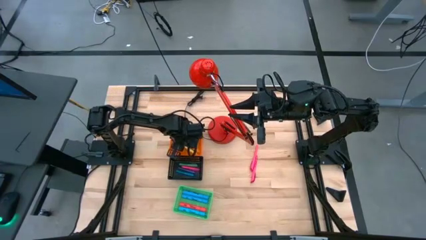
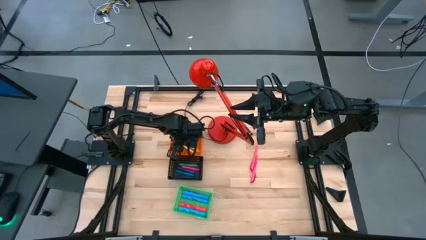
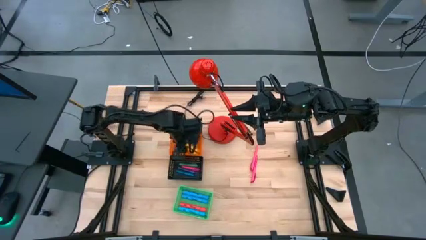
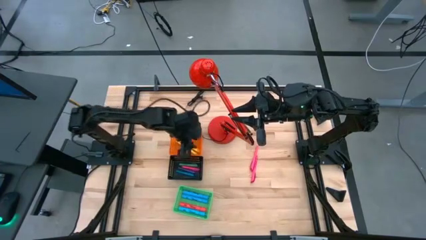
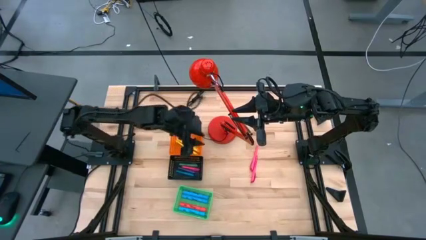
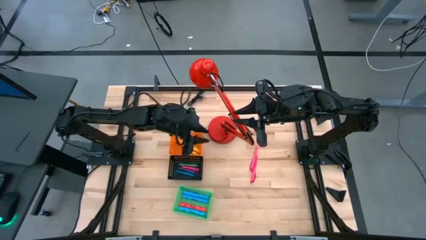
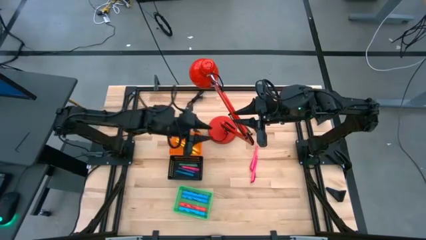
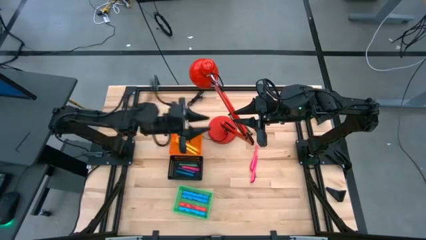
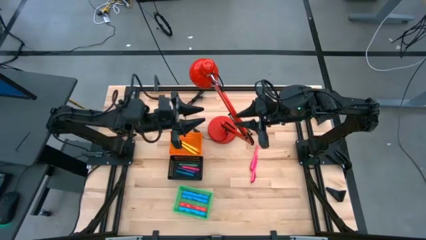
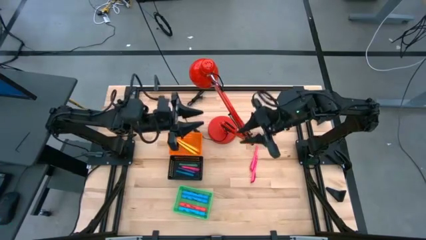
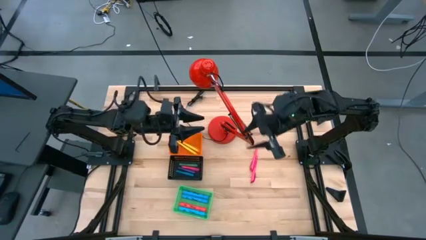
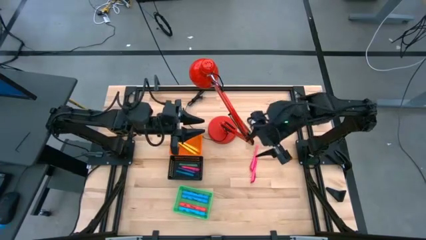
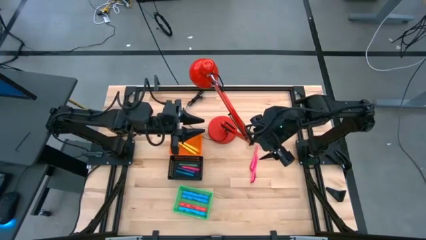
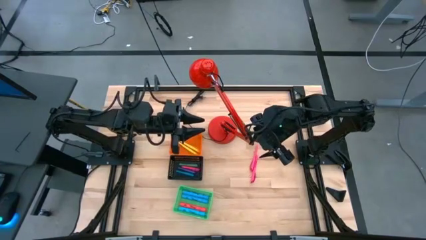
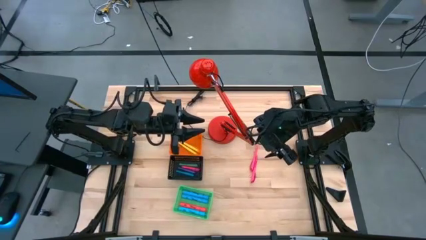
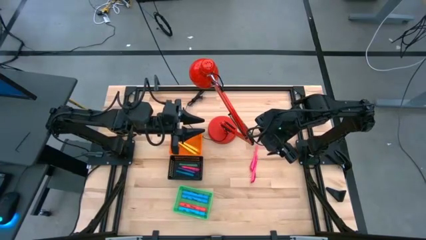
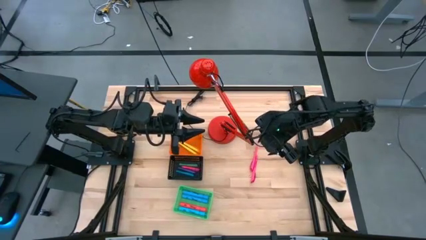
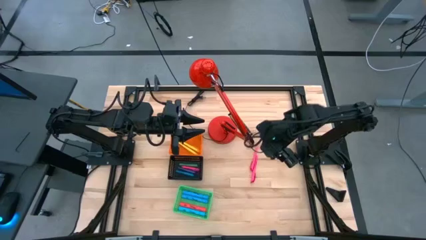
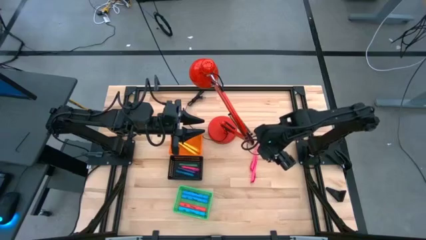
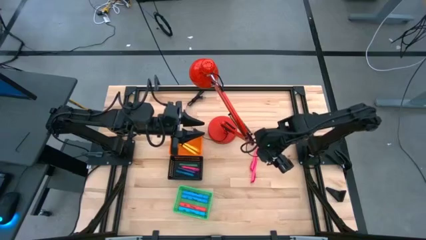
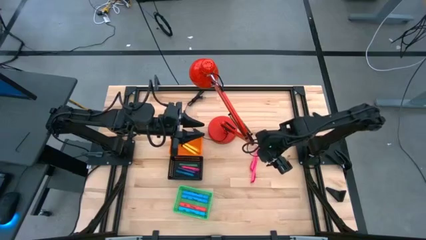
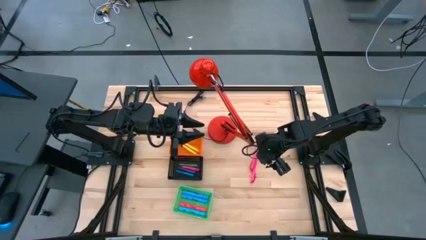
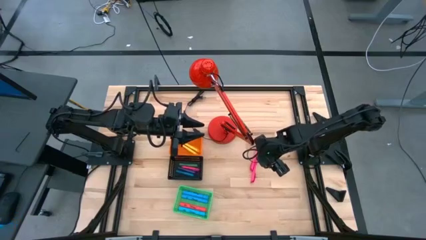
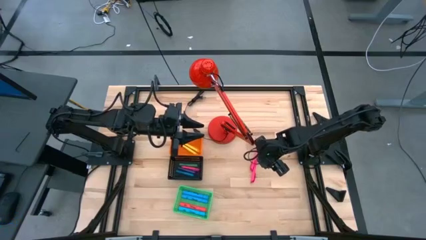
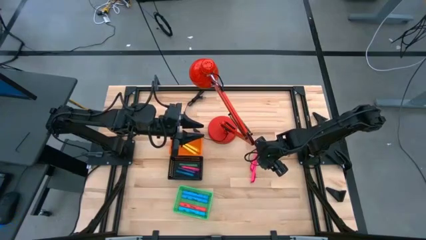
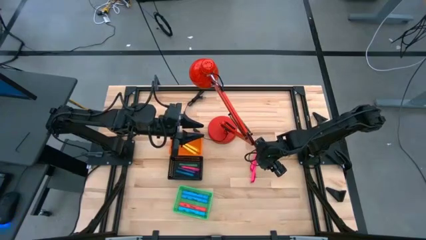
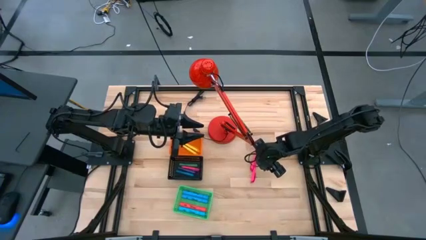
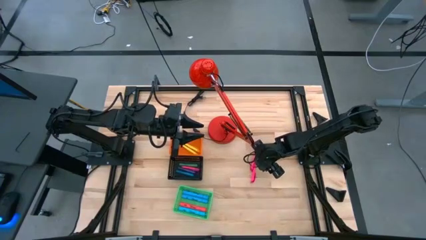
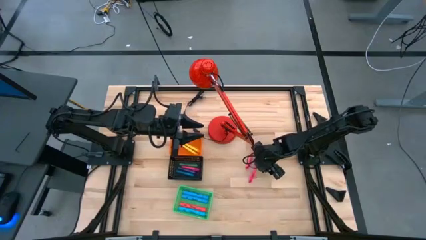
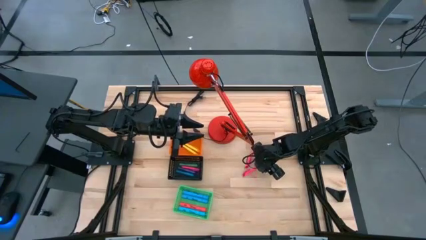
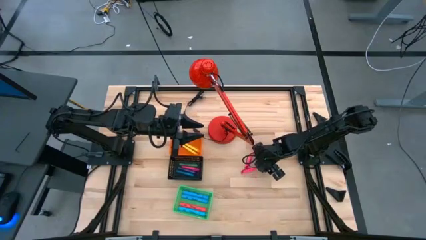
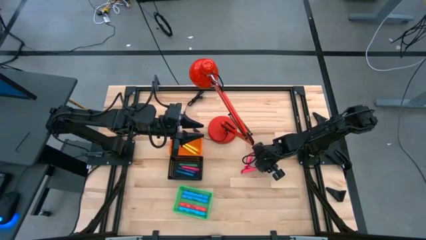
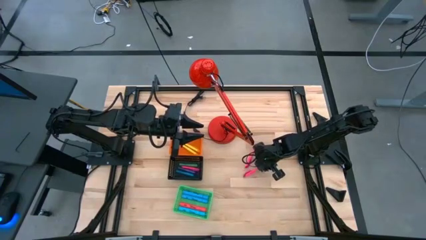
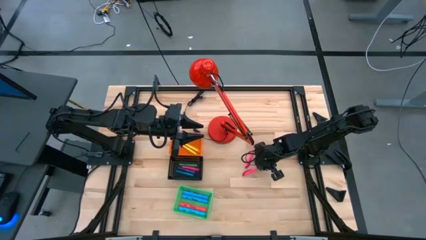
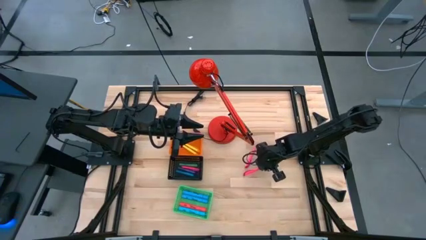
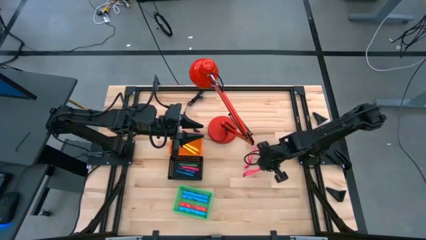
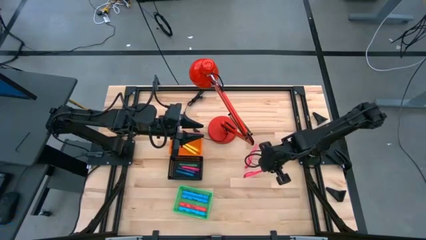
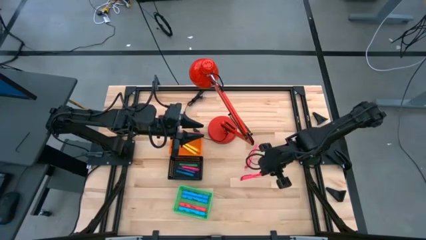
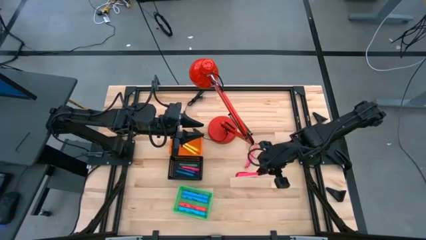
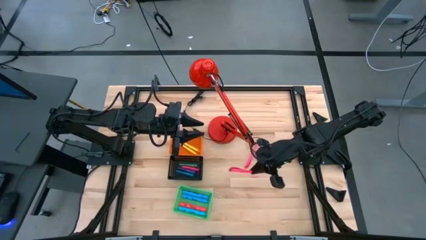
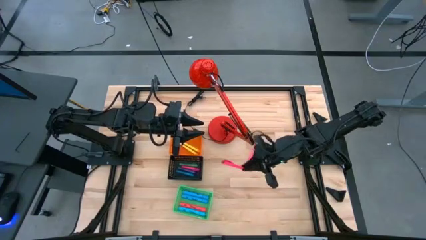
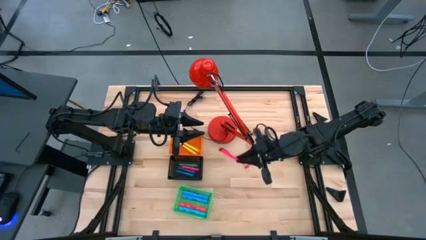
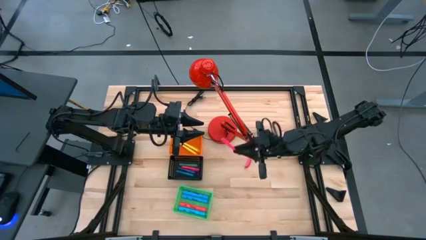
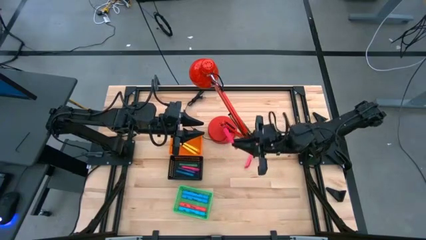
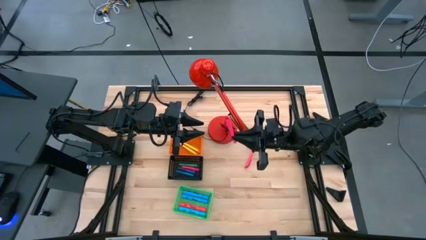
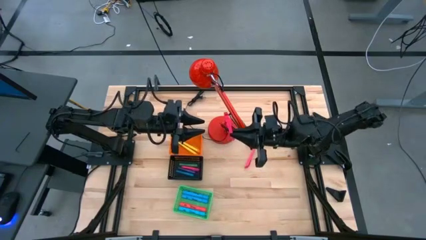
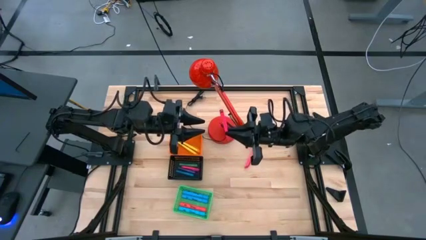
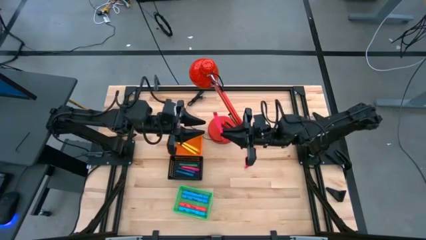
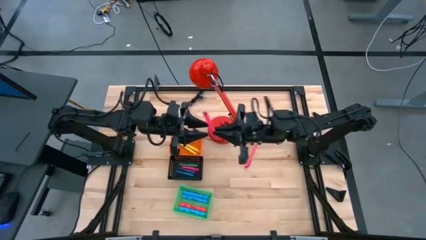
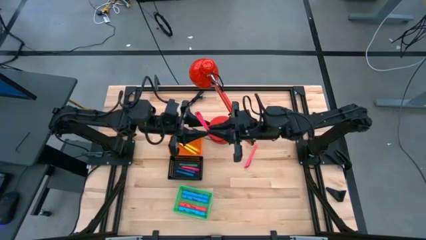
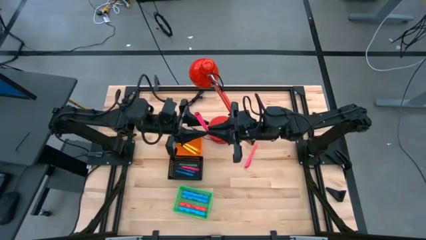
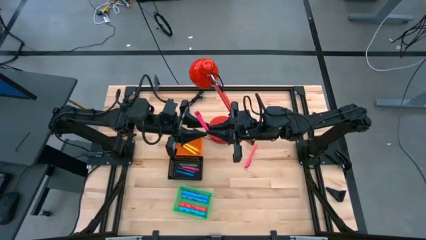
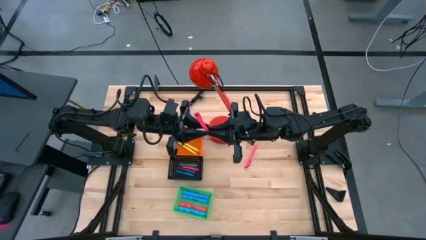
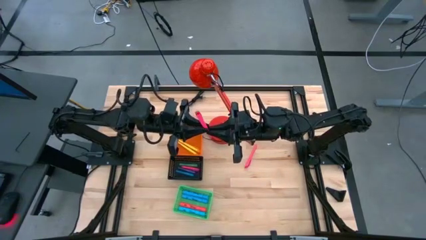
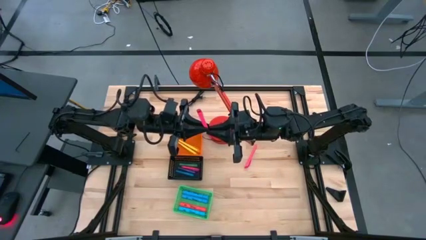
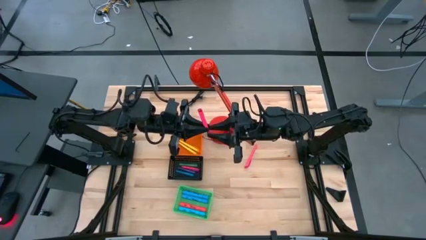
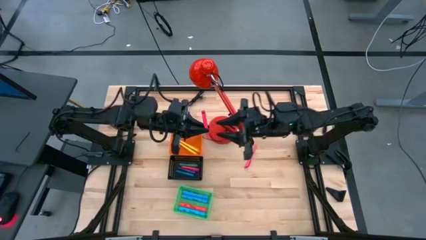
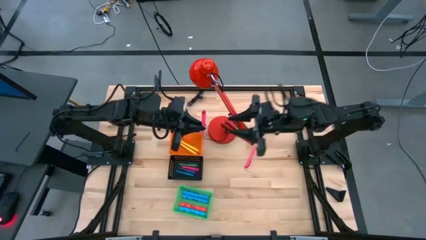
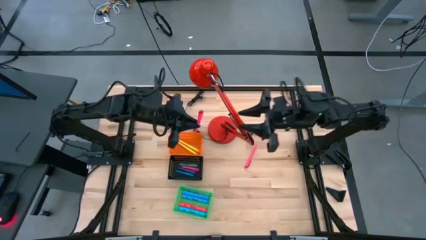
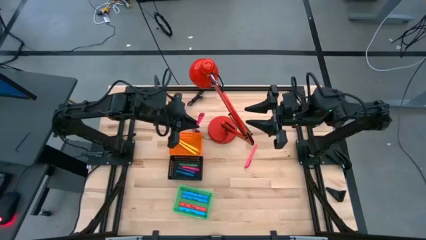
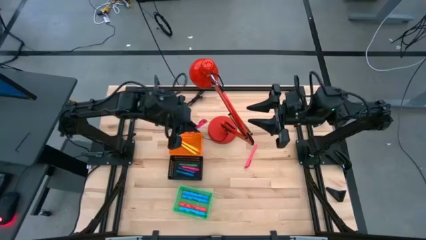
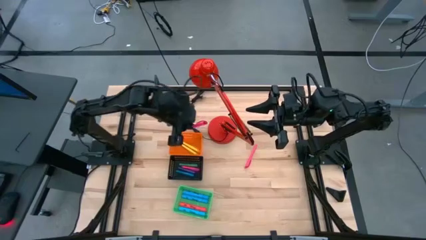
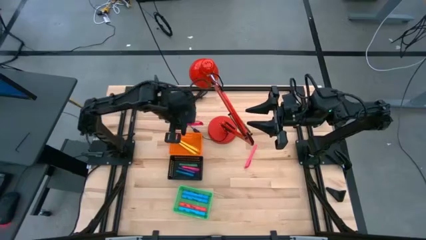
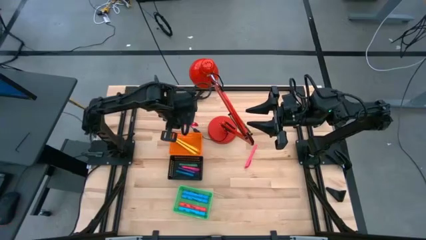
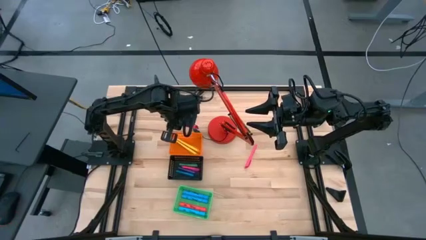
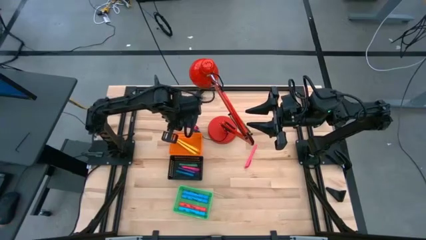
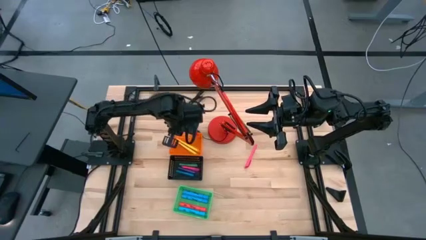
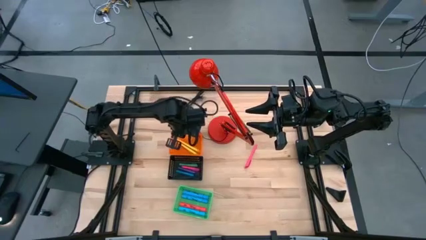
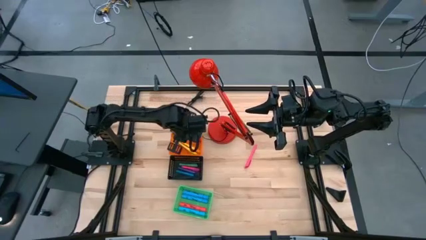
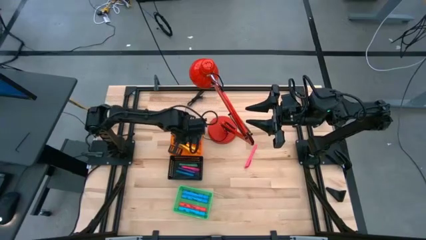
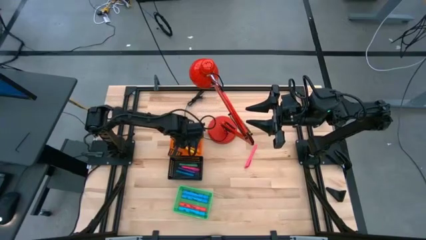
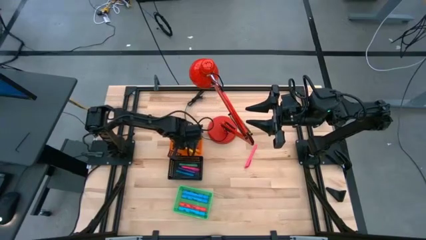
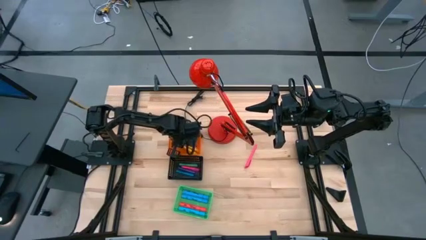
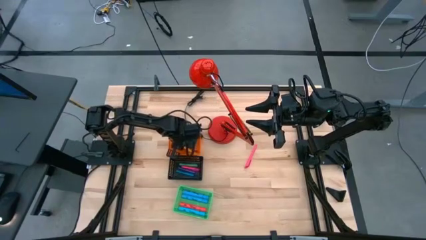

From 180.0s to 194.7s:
Task: Pick & Place Markers
Put the right pink pen into the orange bin
